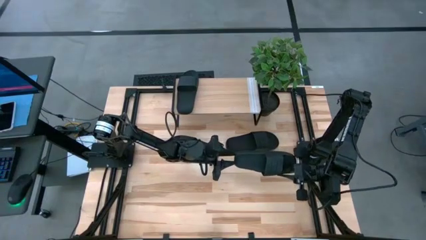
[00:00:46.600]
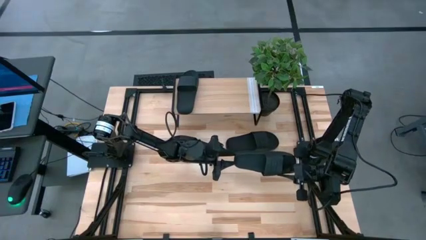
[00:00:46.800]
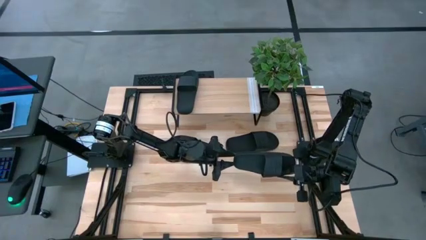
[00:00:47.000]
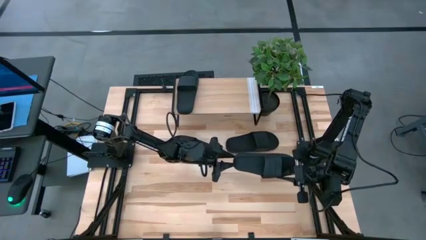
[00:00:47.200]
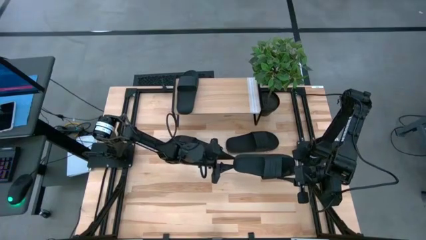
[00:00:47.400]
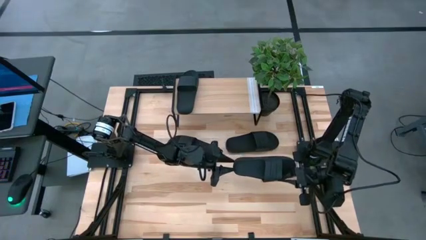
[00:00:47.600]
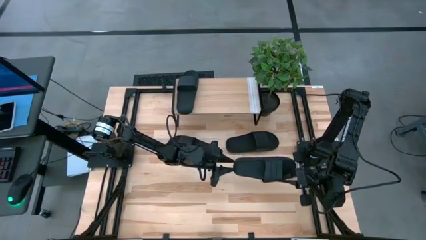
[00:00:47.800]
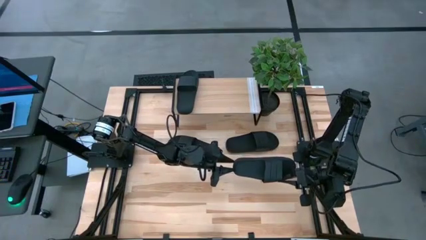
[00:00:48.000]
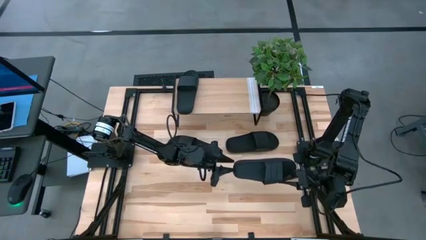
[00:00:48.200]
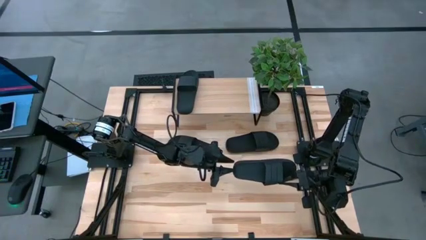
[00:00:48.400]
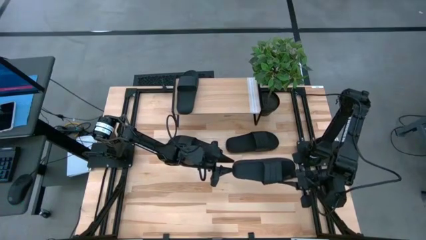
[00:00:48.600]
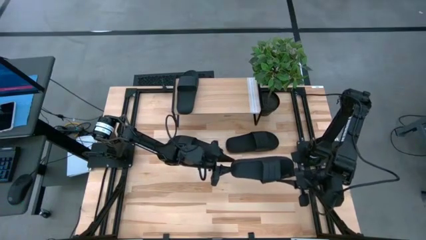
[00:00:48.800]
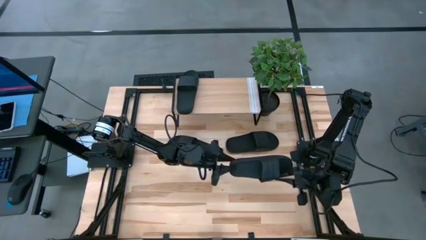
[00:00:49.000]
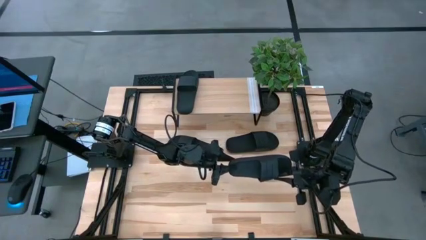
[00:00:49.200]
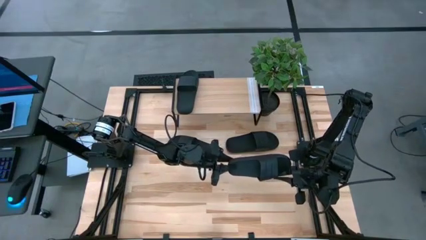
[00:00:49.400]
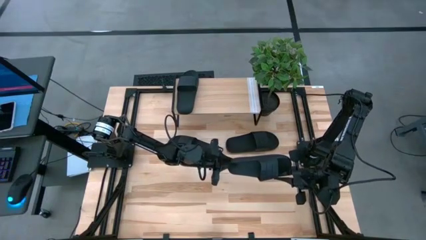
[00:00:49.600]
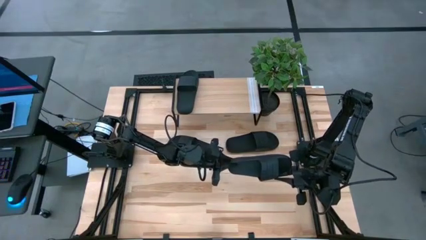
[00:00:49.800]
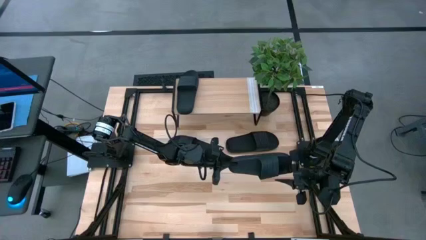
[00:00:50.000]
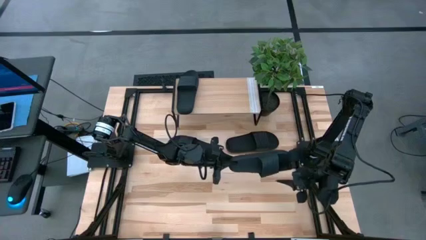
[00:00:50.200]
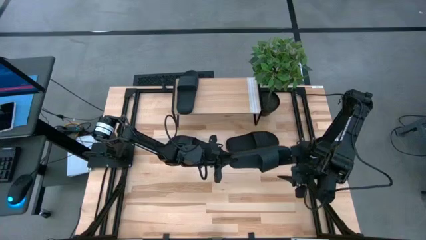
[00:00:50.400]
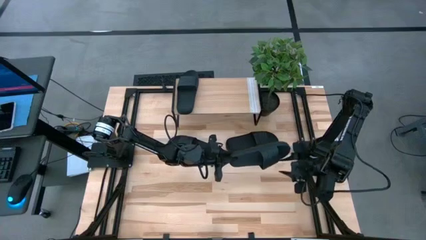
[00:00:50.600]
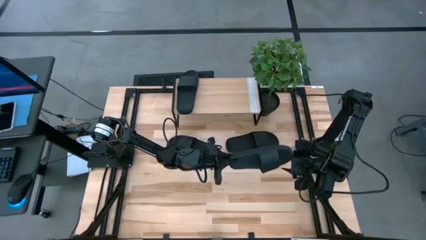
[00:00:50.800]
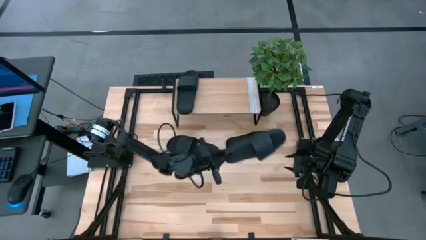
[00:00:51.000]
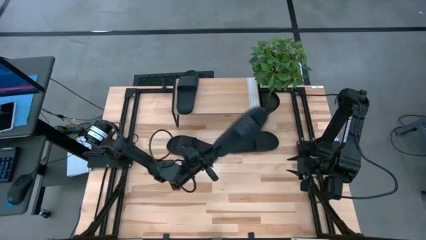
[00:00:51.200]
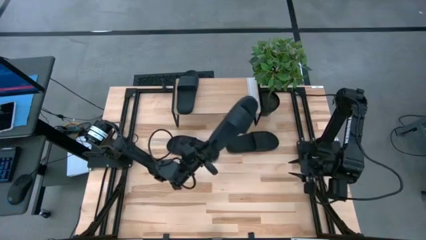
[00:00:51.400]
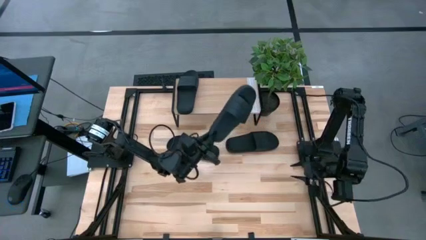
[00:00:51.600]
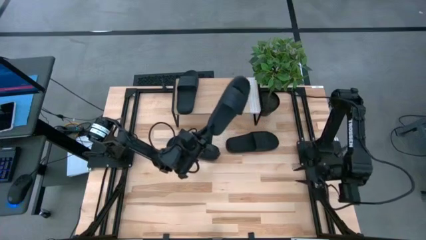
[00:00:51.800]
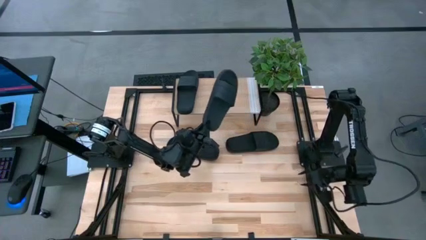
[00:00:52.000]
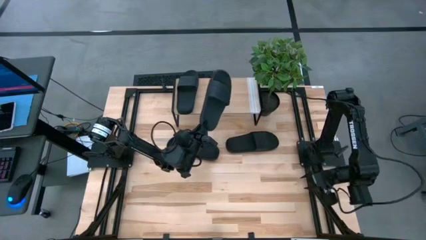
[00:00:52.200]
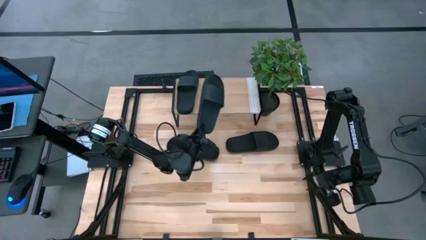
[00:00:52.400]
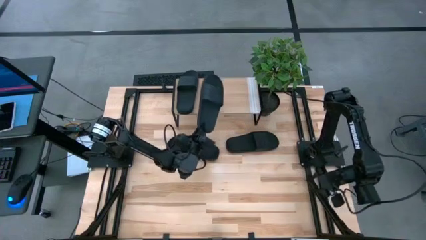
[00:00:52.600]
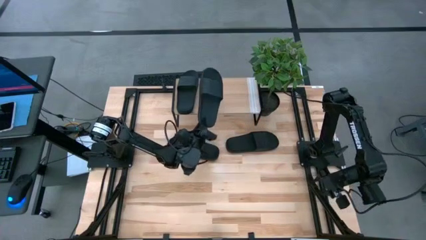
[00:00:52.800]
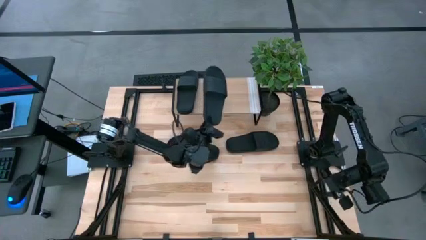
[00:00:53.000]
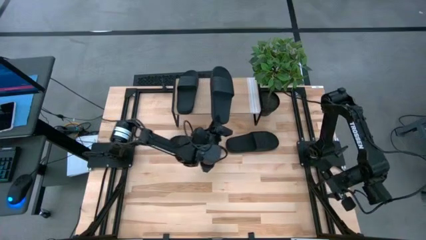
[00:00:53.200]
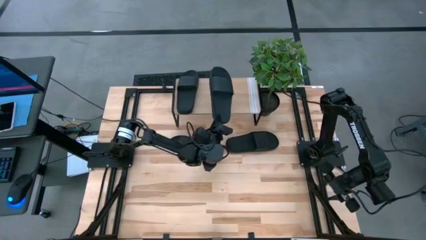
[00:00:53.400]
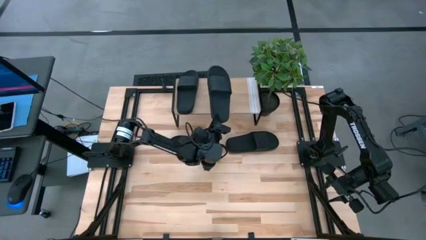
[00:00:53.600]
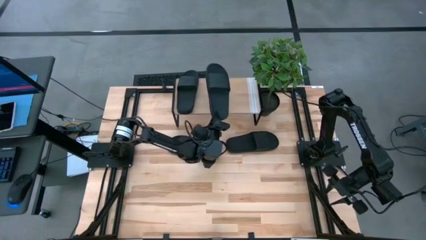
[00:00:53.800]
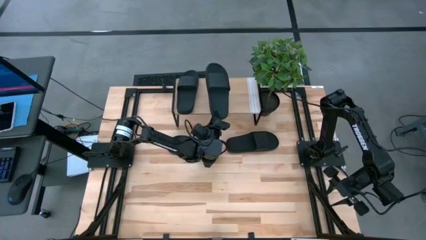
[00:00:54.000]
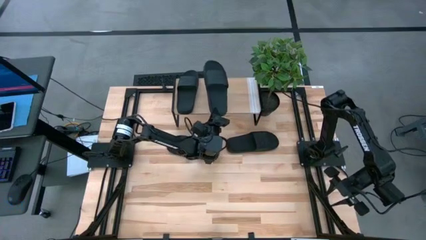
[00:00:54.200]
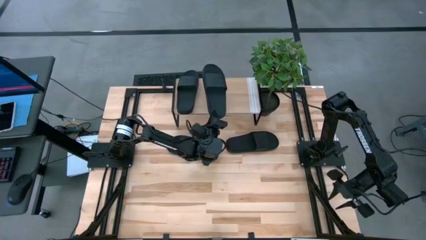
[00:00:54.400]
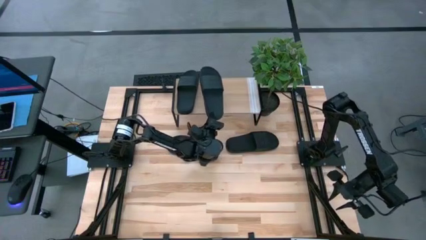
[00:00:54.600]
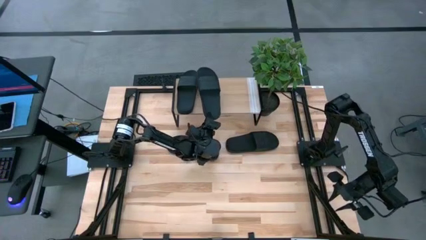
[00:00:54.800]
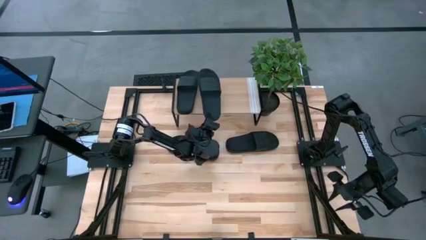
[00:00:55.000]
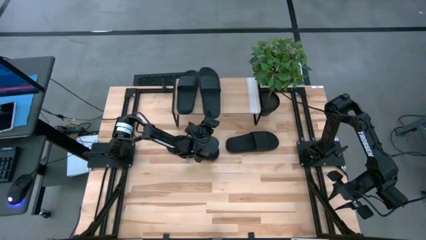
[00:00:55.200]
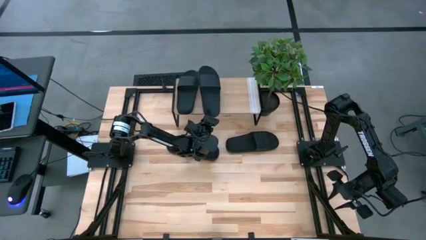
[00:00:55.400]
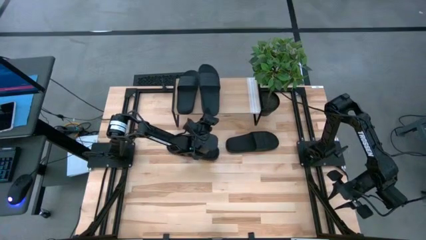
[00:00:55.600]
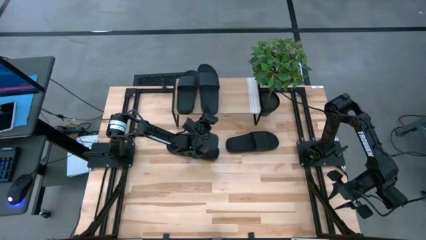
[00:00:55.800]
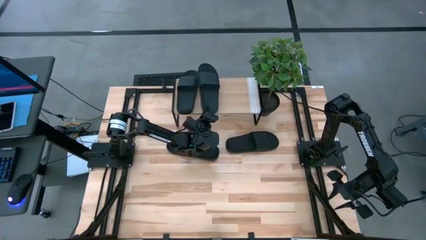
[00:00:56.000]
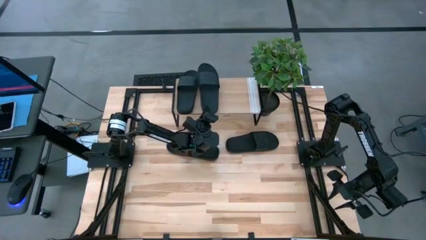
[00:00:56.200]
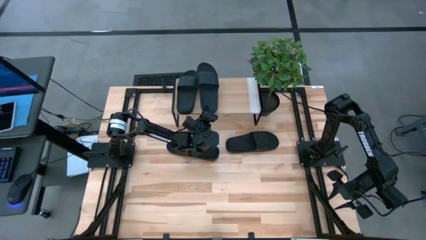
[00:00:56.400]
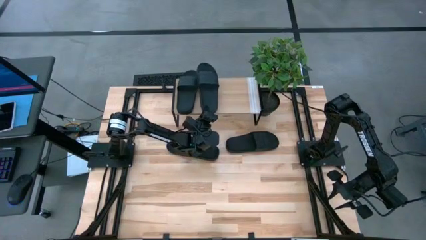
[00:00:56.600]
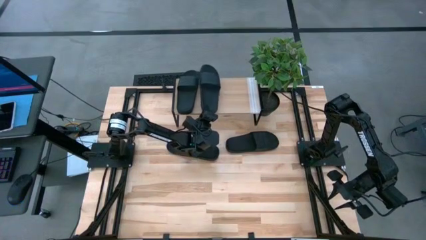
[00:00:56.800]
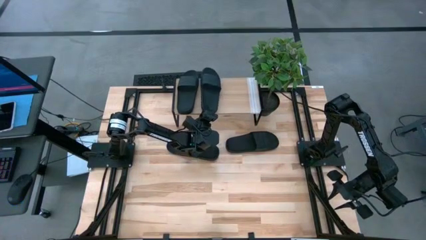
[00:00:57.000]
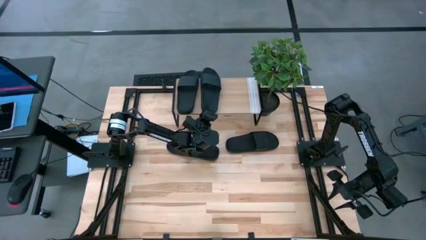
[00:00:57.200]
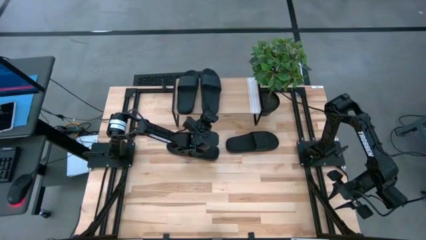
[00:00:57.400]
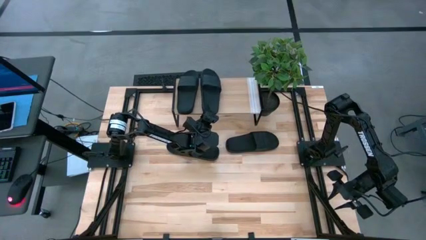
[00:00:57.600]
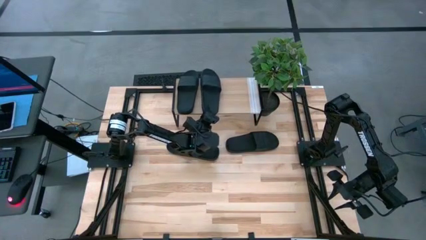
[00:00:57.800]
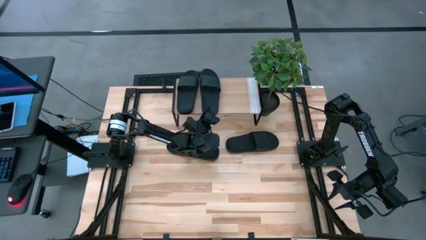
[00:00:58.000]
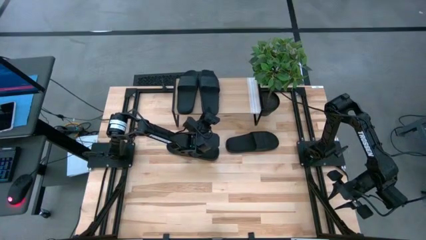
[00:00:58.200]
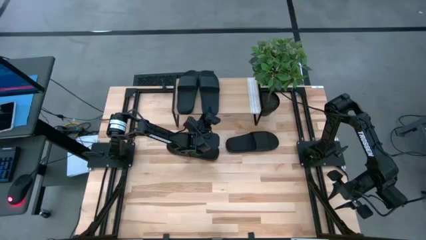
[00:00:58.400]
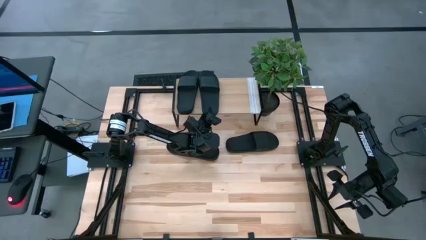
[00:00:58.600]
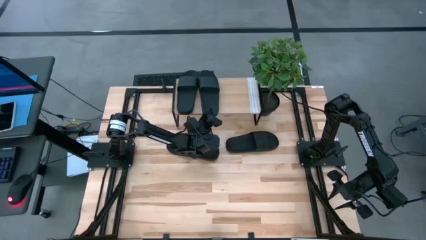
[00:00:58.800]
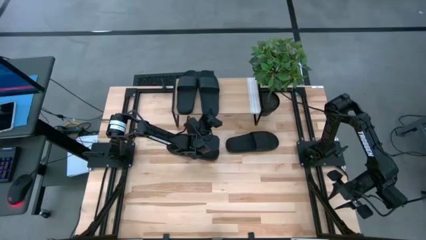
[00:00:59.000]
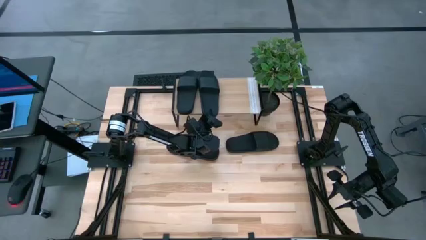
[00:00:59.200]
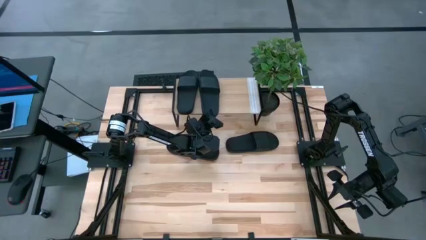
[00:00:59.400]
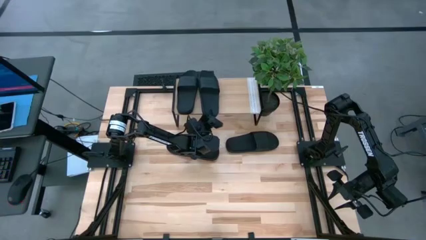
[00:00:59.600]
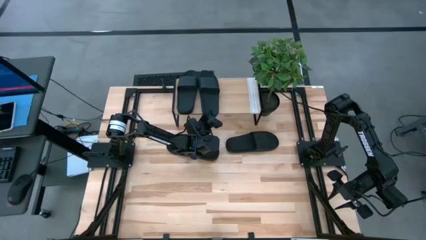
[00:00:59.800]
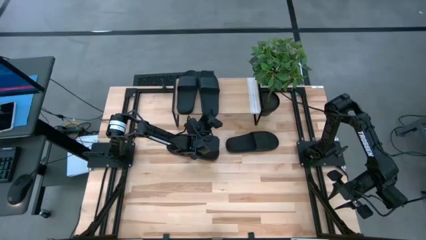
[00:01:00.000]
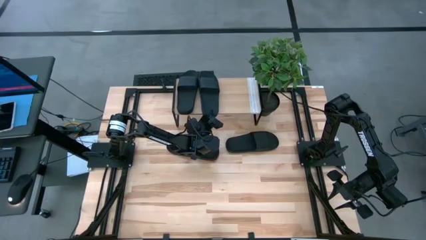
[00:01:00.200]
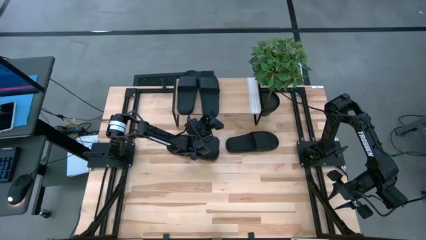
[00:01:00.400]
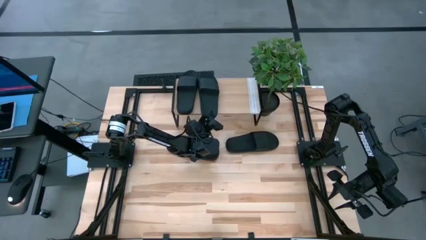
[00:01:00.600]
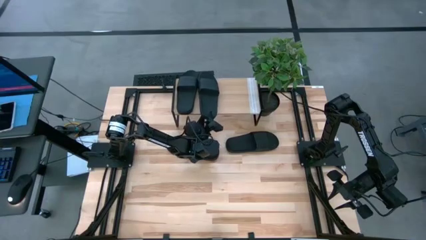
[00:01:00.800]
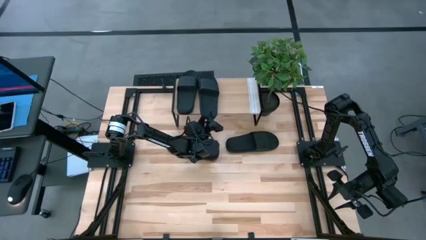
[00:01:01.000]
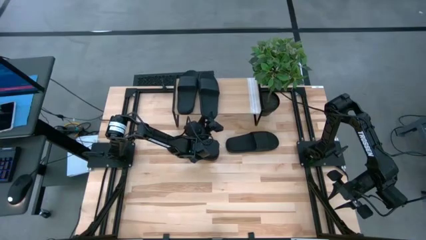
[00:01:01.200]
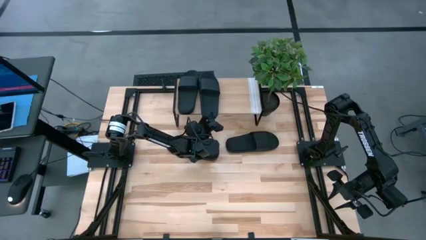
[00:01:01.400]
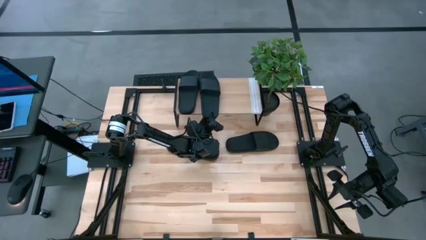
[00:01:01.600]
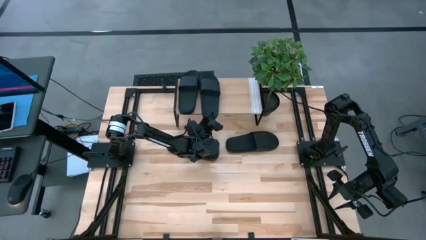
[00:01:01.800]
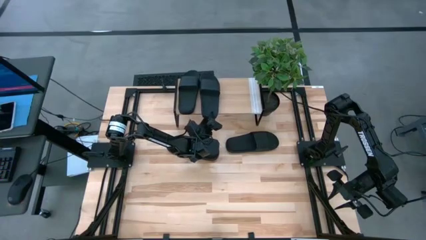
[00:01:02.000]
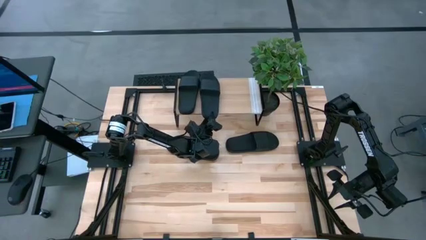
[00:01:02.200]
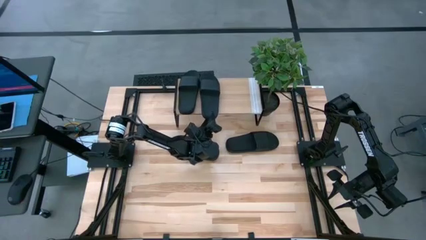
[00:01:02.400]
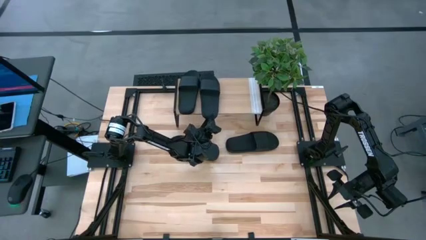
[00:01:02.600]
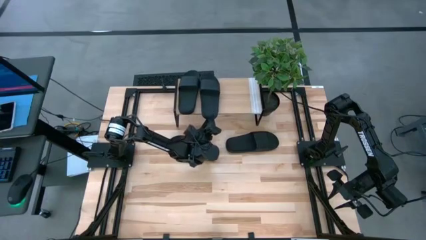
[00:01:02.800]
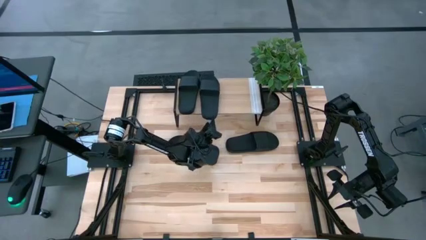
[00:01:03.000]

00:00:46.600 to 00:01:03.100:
Task: Pick and place slides into the shelf
Put the bottom black slide on the shelf
